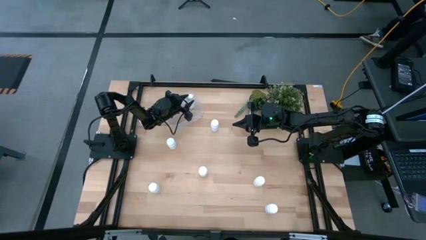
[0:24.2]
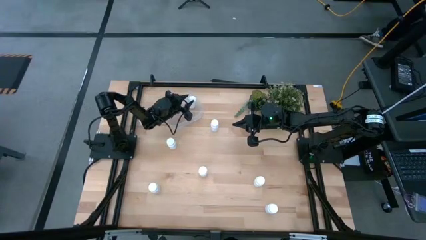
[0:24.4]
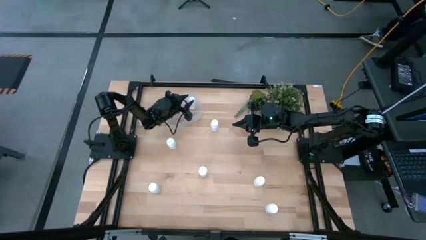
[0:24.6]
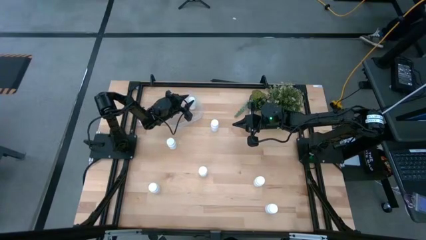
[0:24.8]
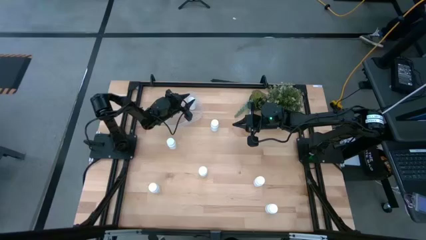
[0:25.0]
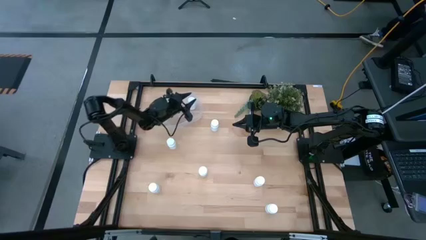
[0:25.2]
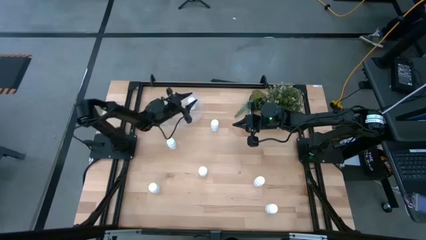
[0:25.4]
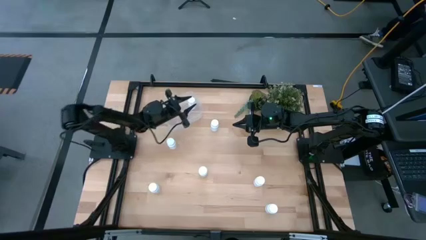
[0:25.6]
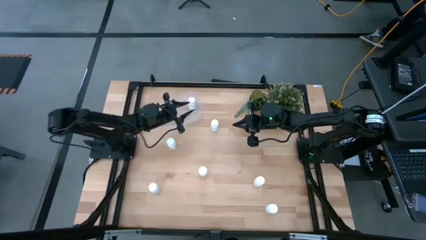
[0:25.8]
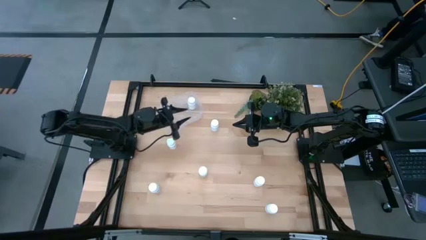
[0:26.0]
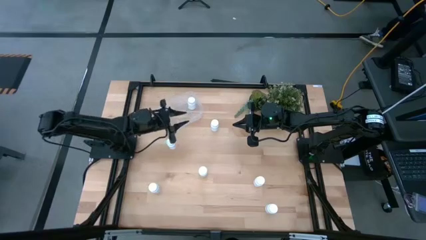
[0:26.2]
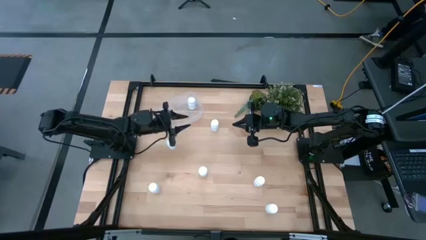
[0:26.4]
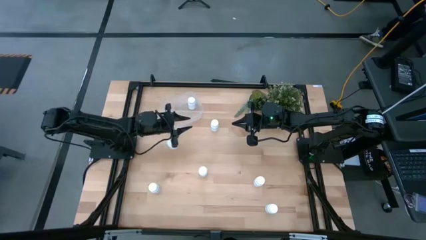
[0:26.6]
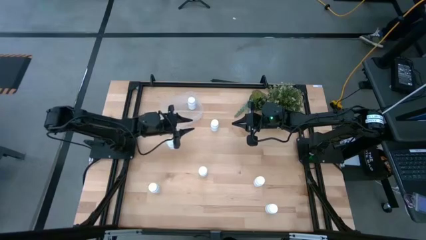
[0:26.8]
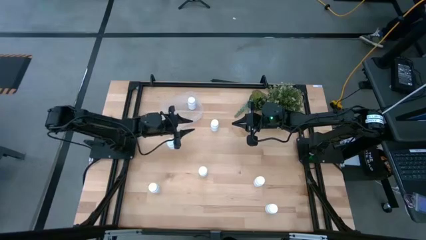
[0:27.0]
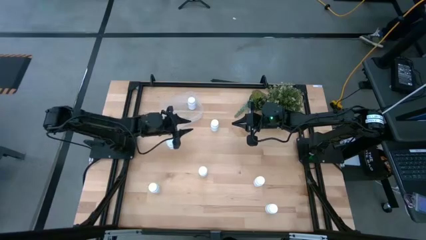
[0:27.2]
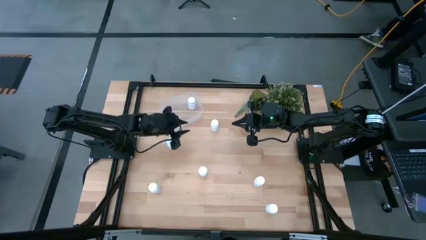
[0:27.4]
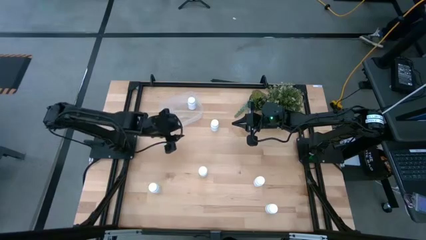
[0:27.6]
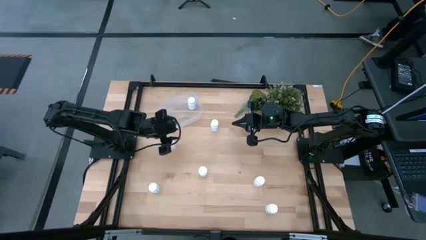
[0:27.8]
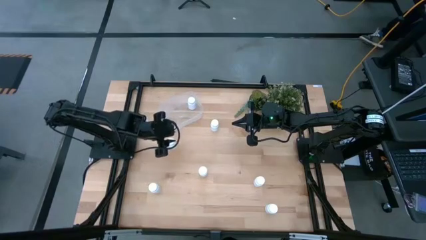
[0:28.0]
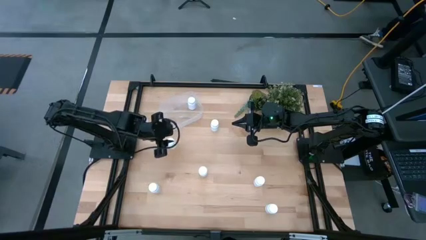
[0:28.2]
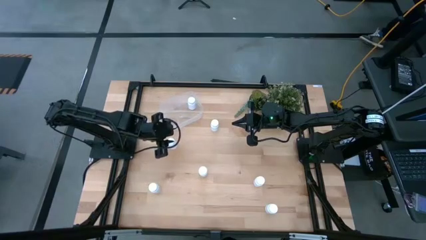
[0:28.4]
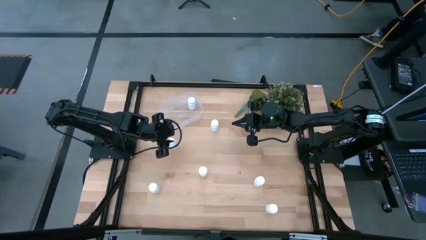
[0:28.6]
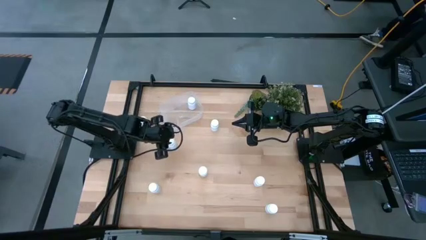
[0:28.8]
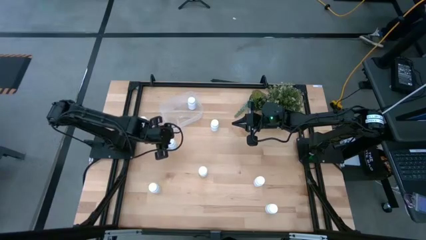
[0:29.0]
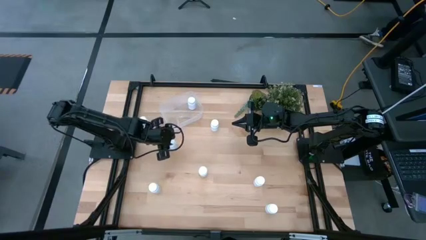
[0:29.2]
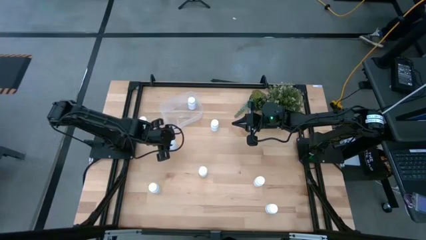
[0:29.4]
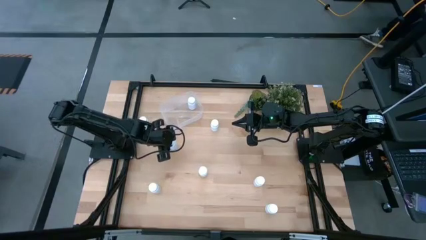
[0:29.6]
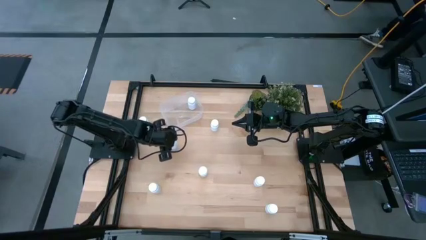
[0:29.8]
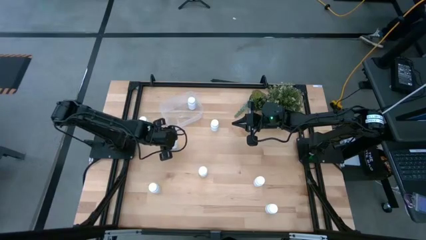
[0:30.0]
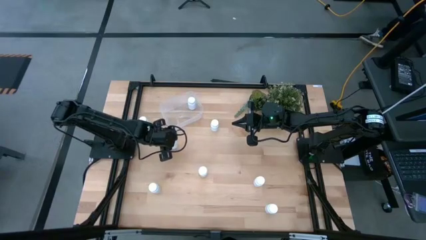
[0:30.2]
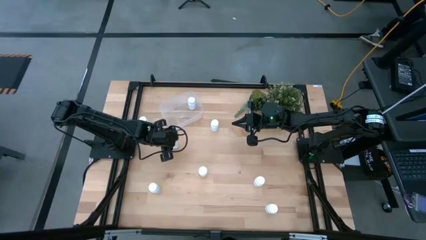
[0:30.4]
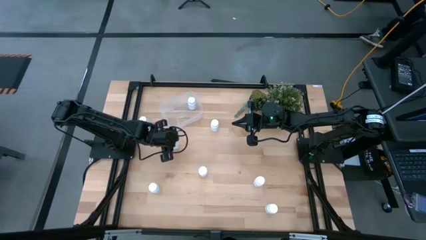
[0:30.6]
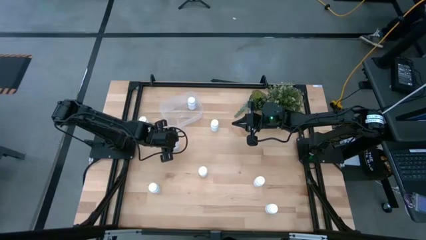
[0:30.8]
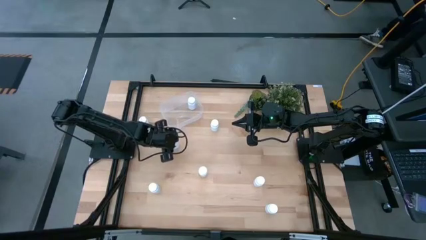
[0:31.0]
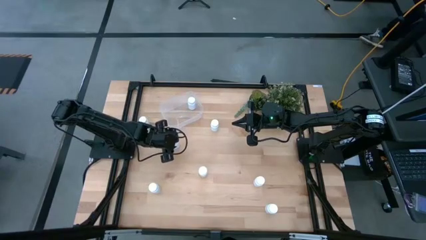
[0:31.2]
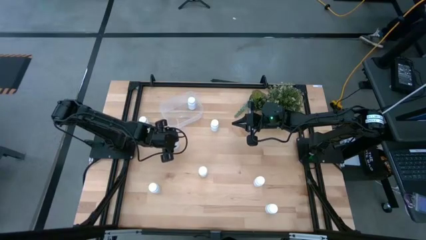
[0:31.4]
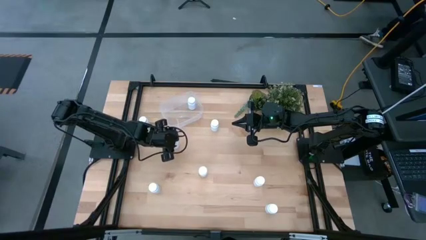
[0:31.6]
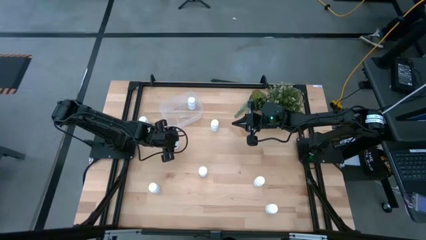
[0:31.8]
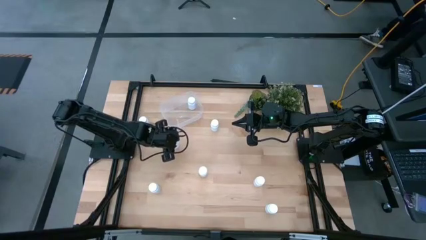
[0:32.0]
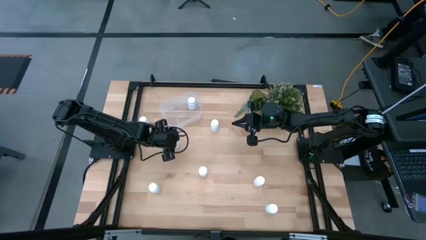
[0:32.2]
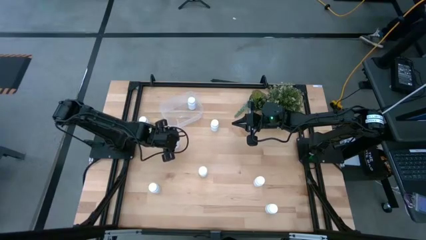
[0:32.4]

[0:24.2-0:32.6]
Task: Pick and place pill bottles into a basket
Put the white medicine bottle into the transparent bin

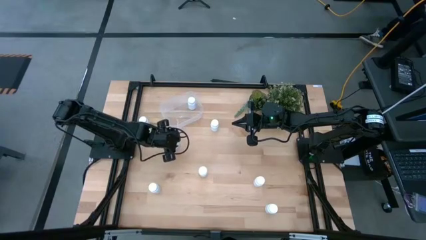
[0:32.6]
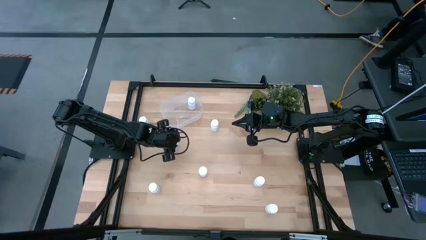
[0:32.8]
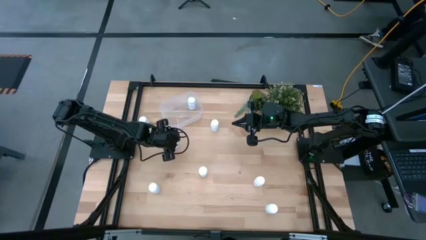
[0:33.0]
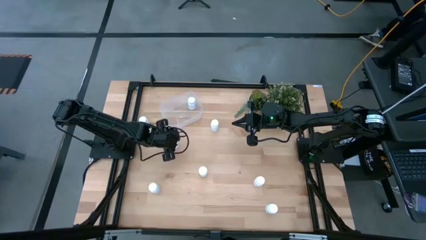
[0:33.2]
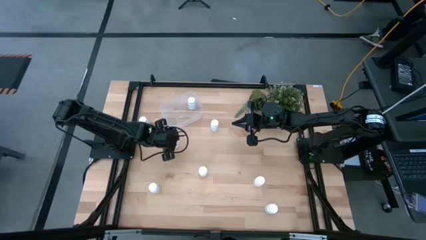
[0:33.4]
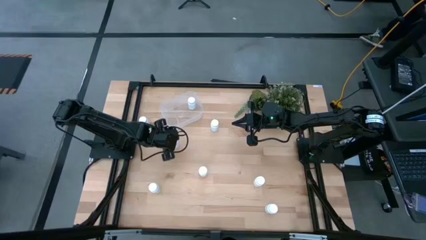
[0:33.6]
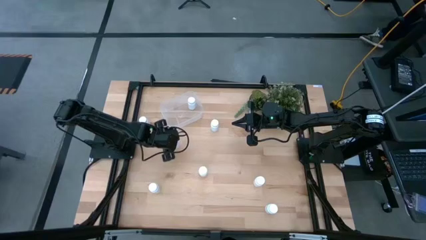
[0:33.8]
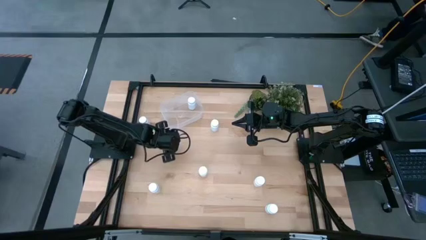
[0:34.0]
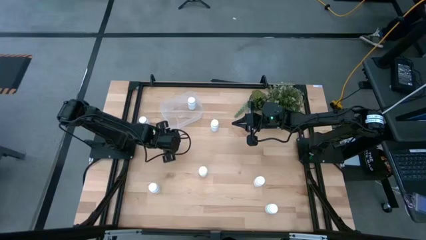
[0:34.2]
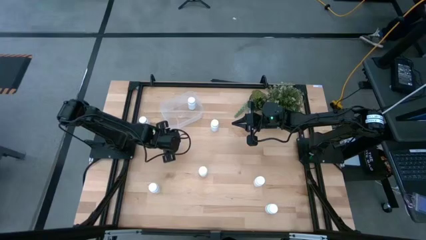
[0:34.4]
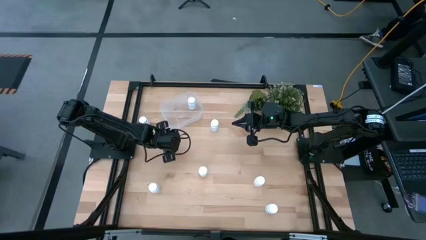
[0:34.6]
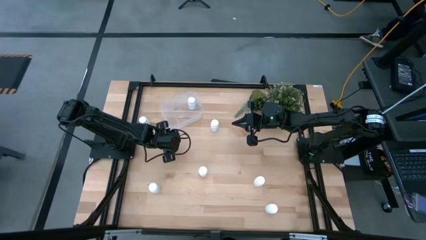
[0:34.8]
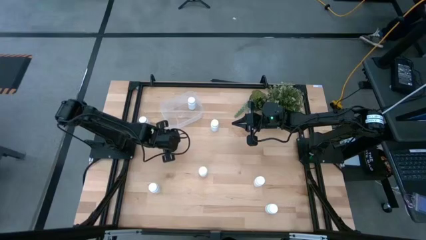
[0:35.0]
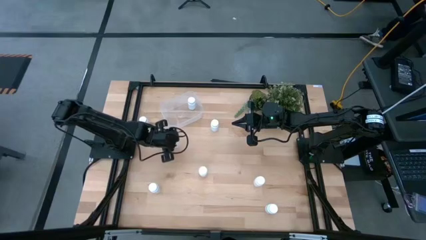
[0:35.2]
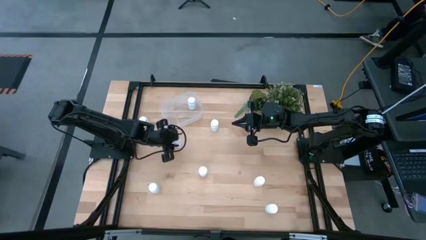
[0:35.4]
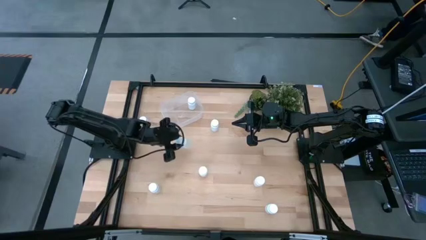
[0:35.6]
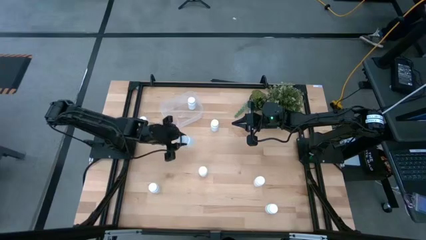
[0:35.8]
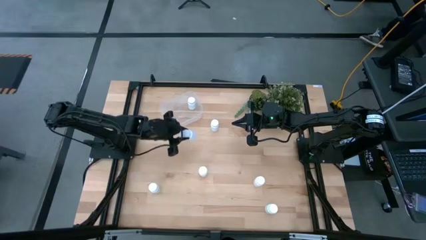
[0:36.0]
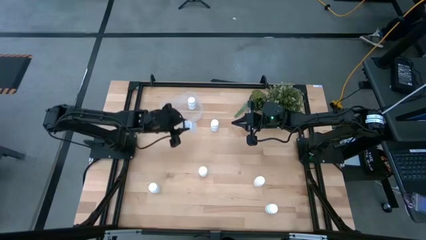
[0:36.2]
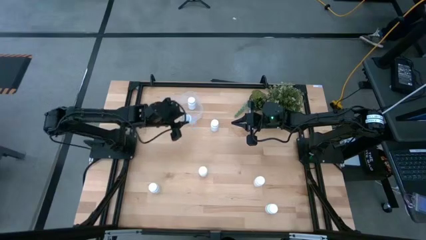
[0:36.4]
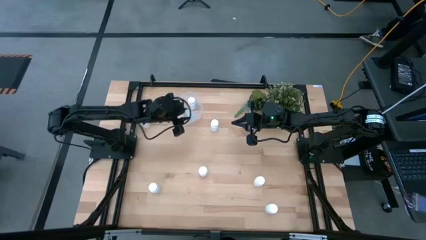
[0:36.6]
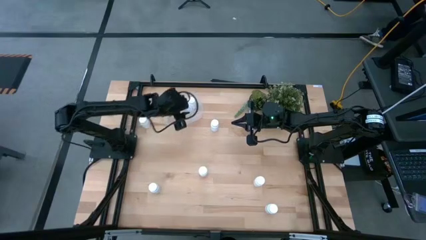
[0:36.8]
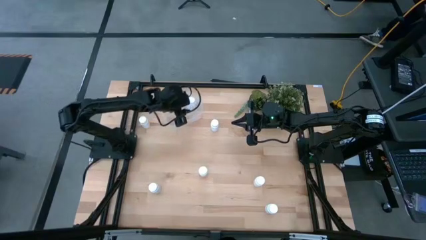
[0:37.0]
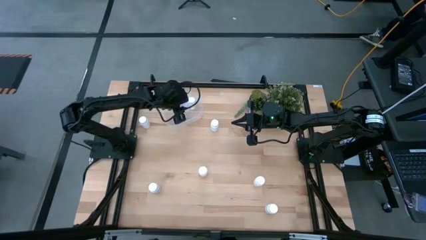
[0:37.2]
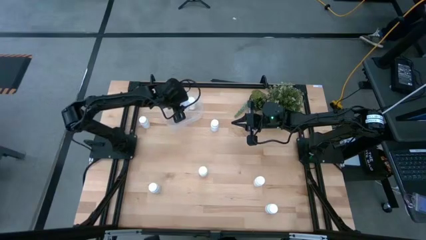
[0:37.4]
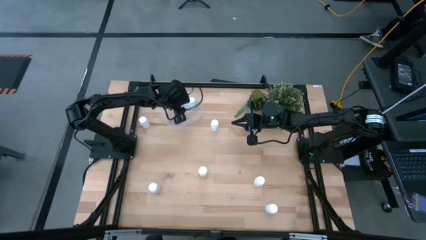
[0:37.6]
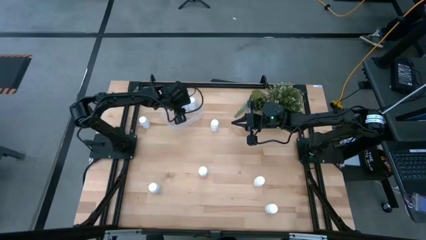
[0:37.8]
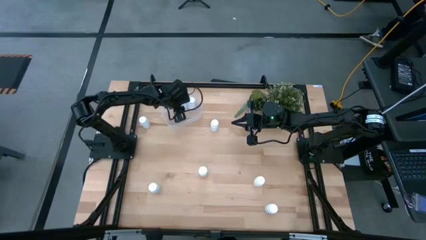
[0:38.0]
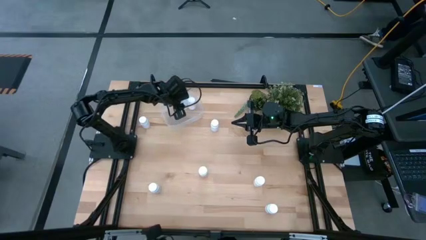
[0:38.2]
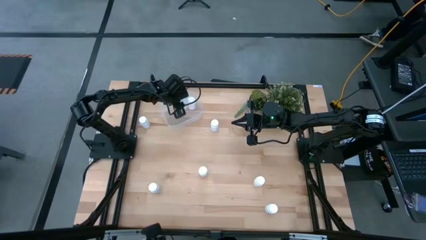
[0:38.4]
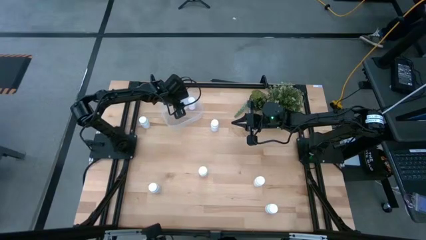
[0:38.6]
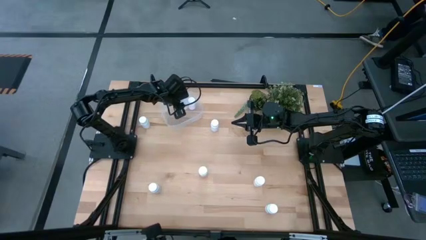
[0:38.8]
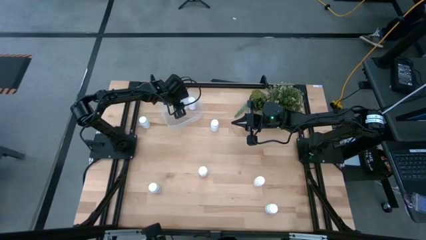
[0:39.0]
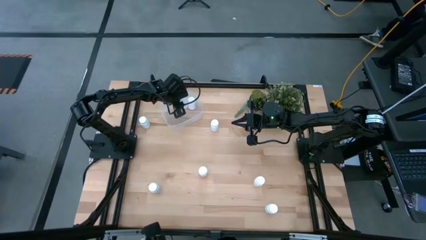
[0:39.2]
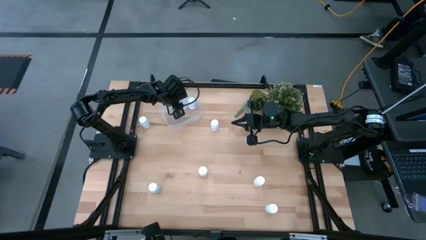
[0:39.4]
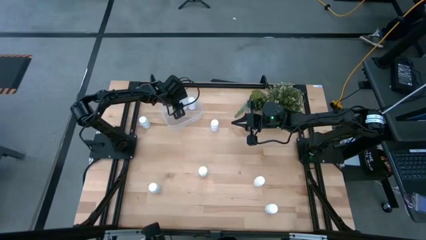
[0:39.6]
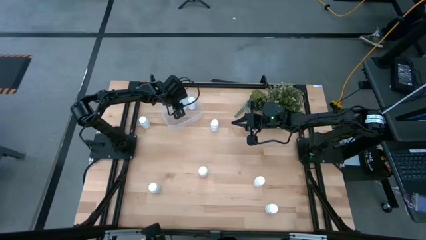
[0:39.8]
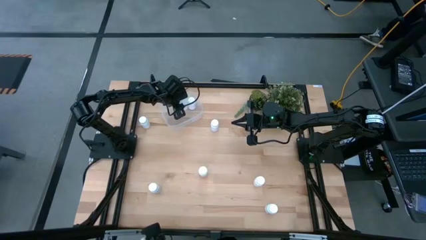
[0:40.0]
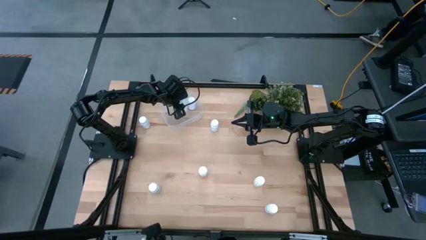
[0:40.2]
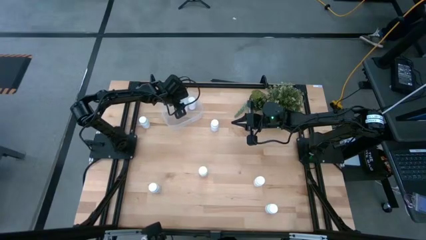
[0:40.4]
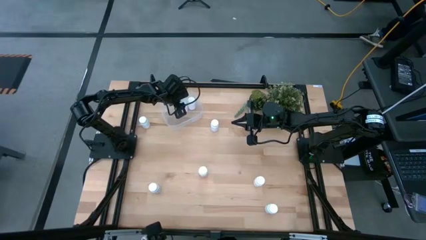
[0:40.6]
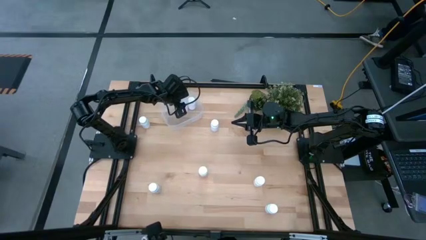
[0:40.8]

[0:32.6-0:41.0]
Put the white medicine bottle into the transparent bin
